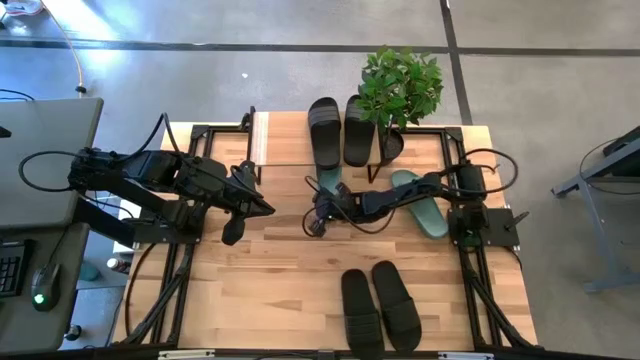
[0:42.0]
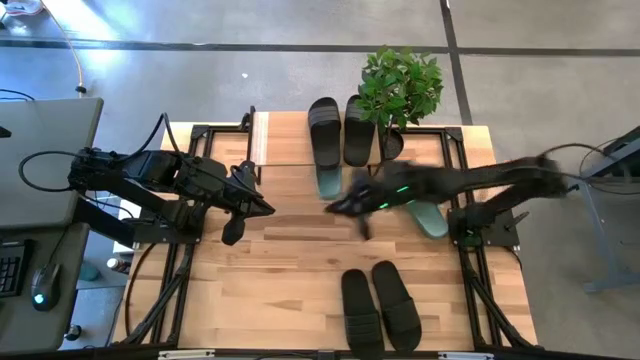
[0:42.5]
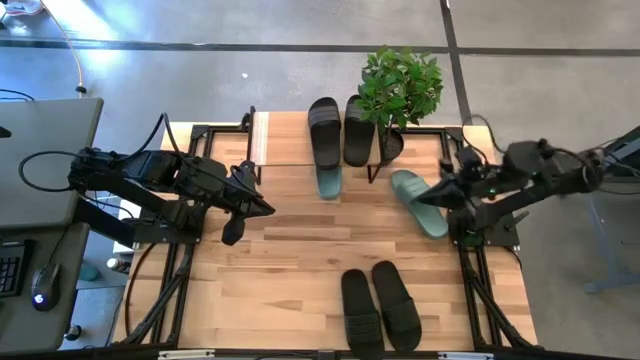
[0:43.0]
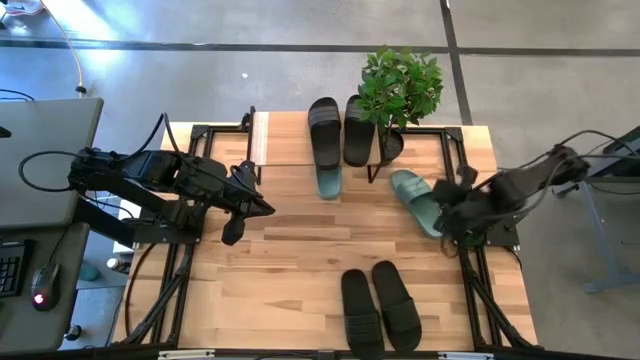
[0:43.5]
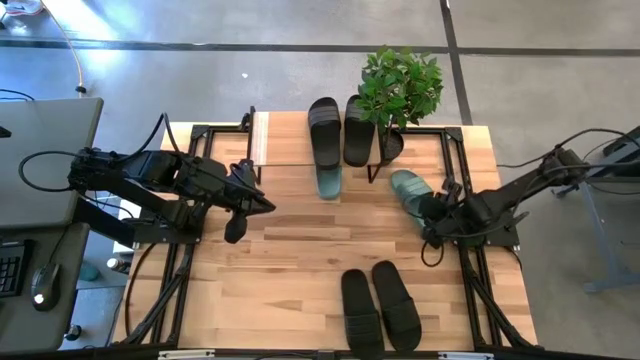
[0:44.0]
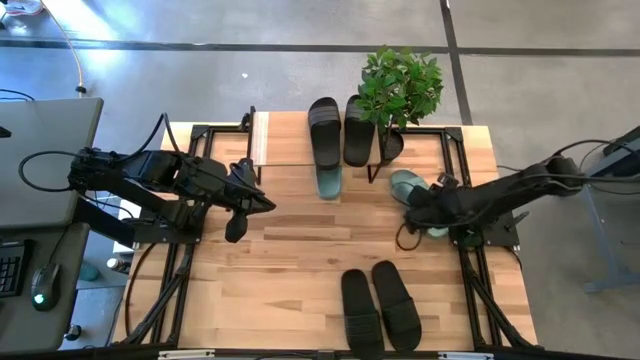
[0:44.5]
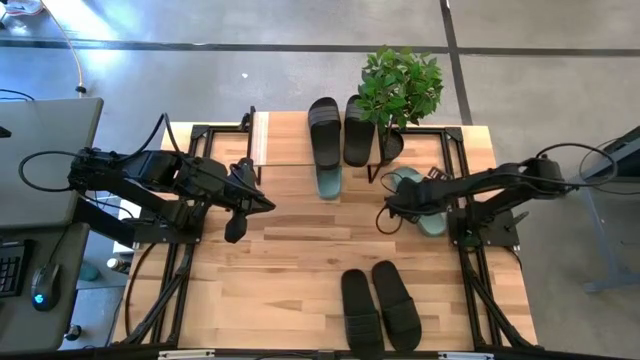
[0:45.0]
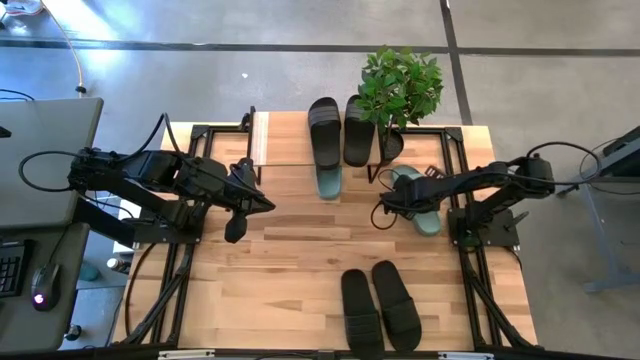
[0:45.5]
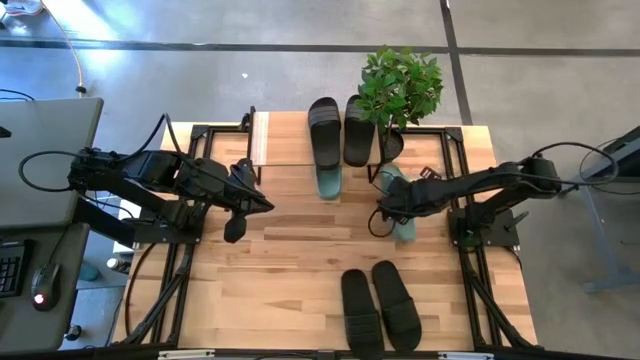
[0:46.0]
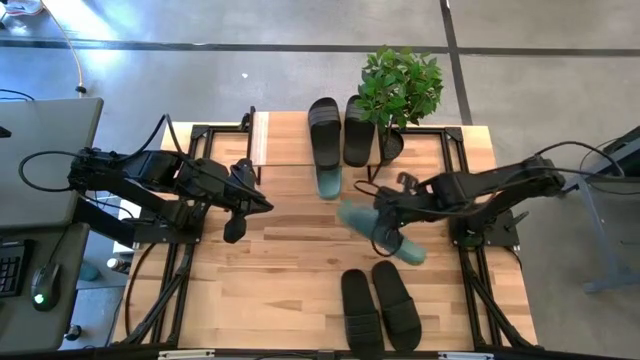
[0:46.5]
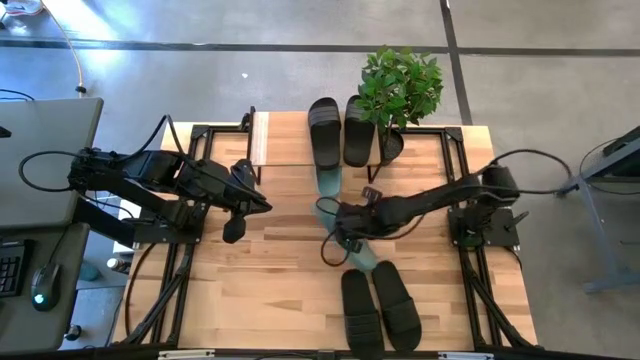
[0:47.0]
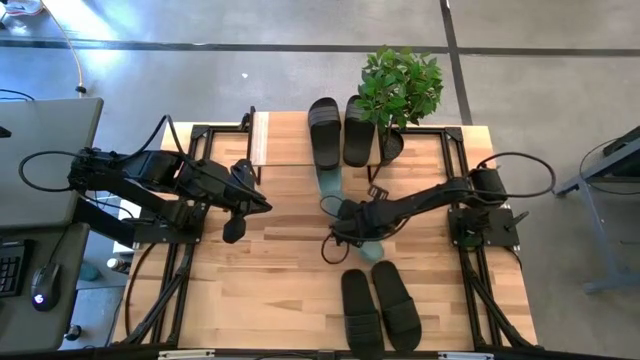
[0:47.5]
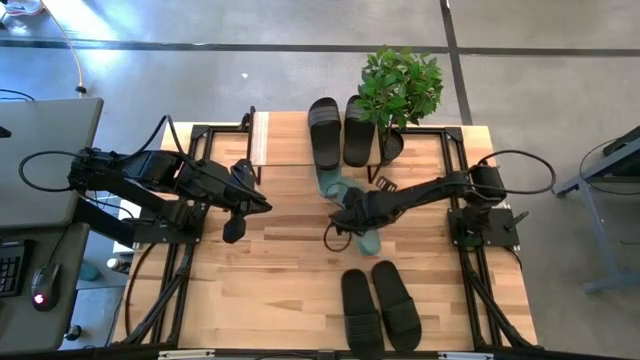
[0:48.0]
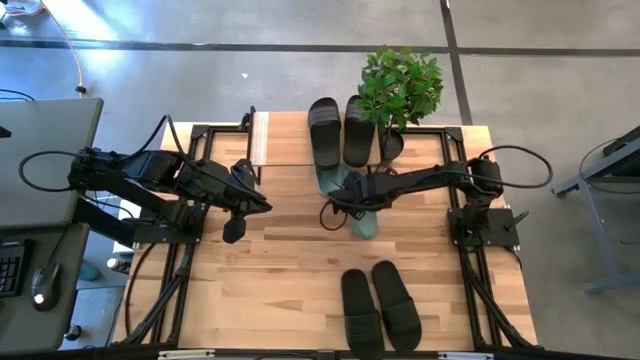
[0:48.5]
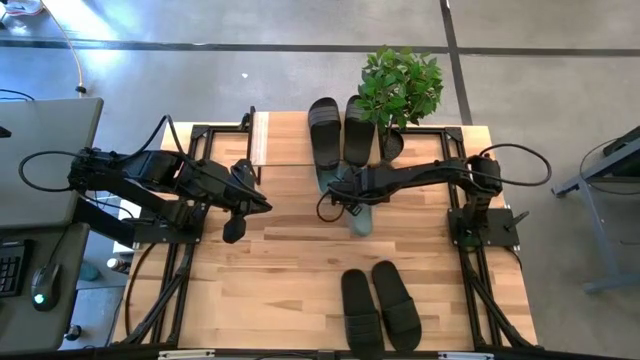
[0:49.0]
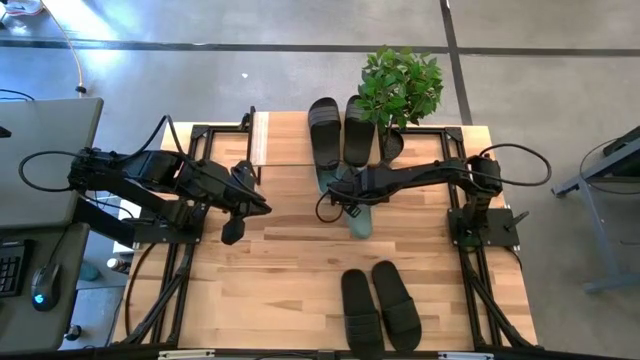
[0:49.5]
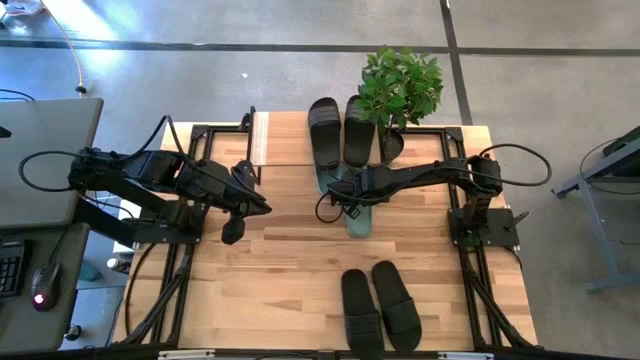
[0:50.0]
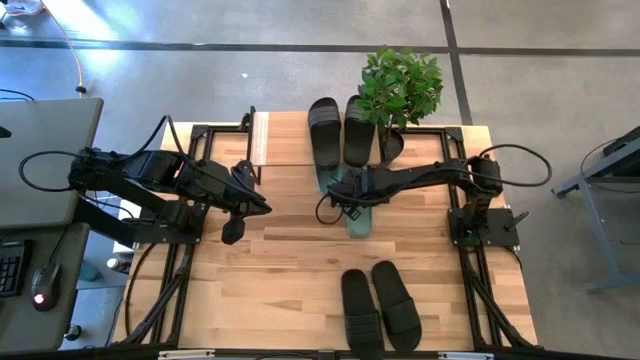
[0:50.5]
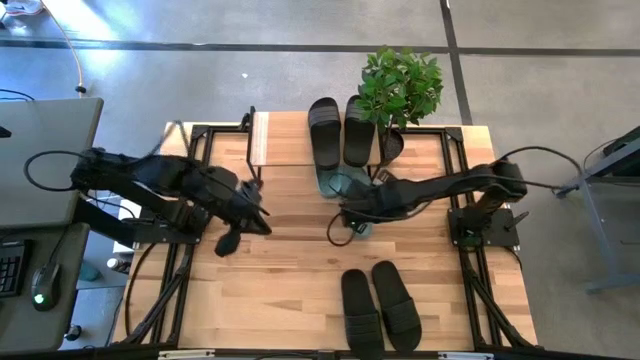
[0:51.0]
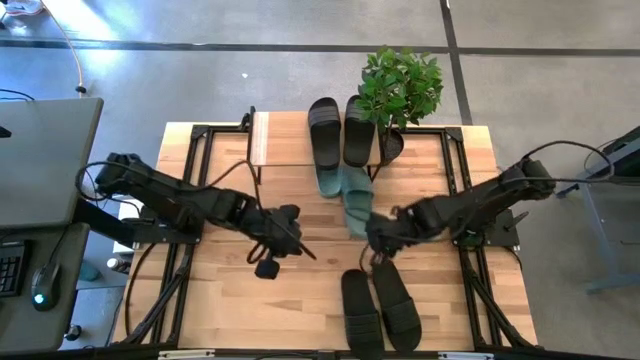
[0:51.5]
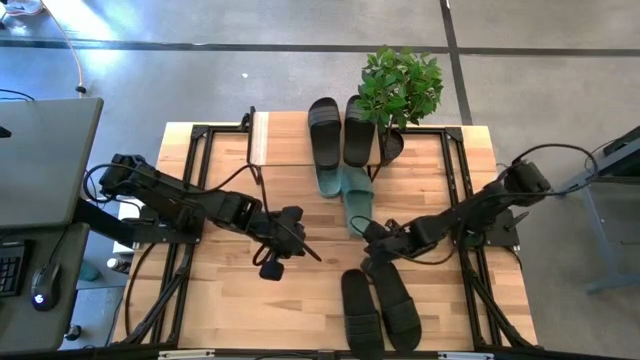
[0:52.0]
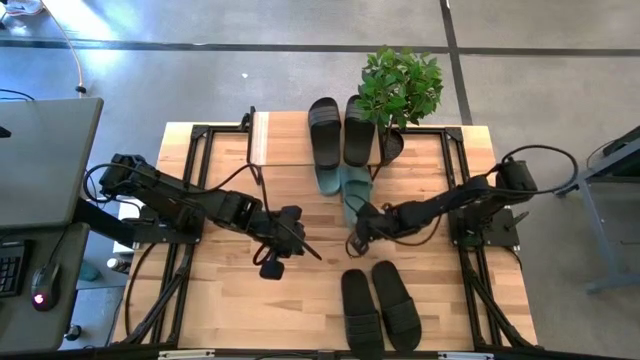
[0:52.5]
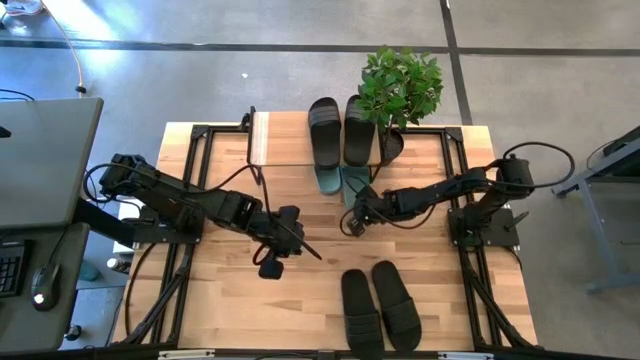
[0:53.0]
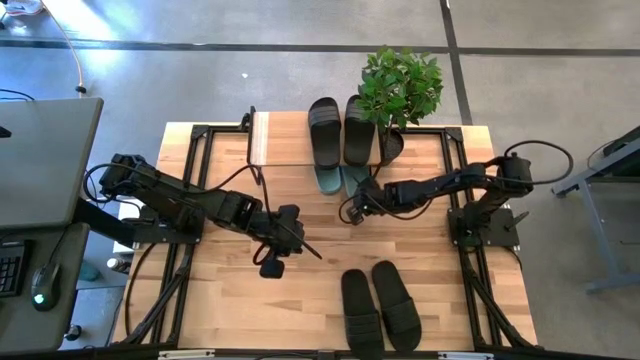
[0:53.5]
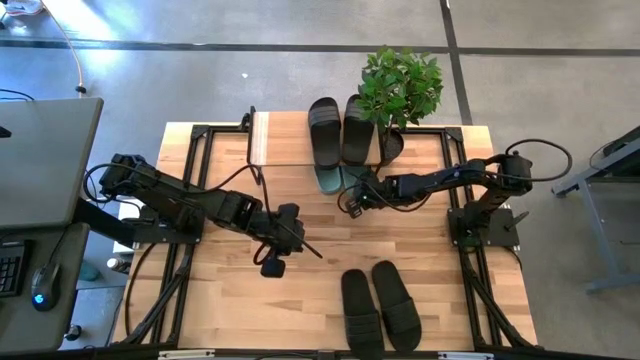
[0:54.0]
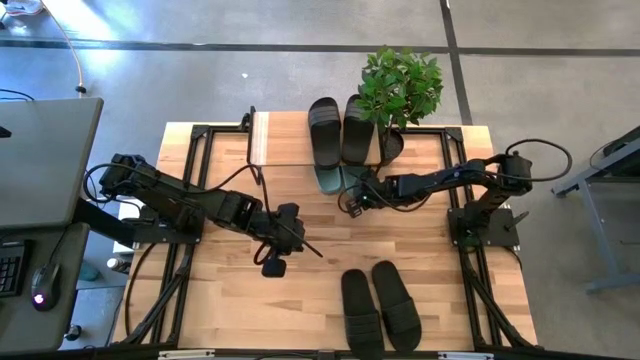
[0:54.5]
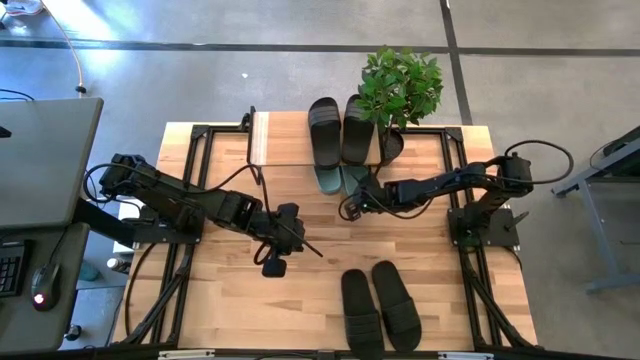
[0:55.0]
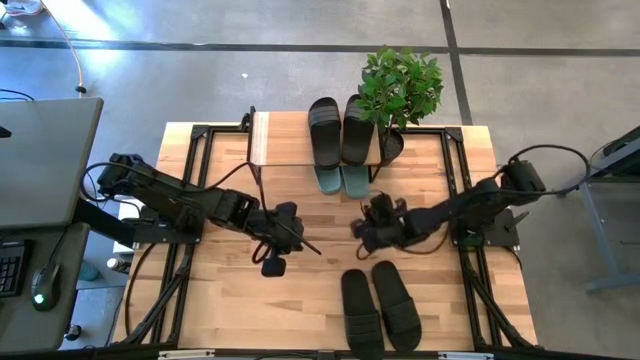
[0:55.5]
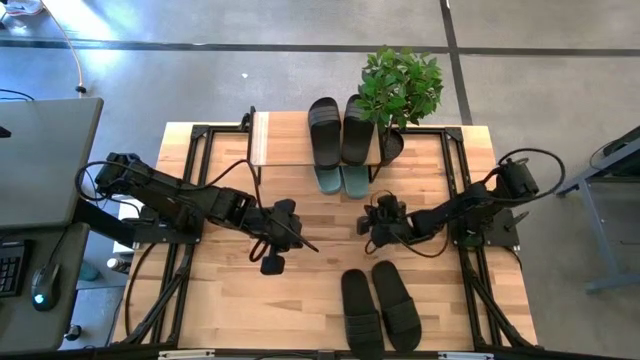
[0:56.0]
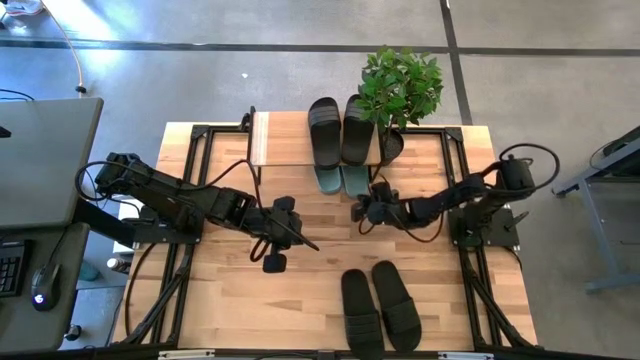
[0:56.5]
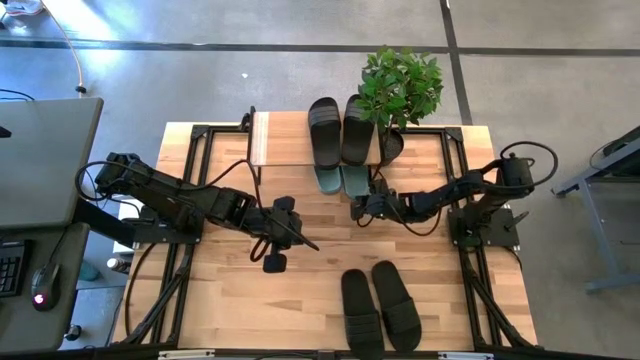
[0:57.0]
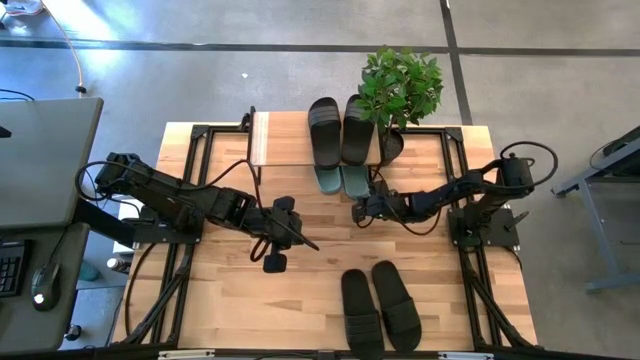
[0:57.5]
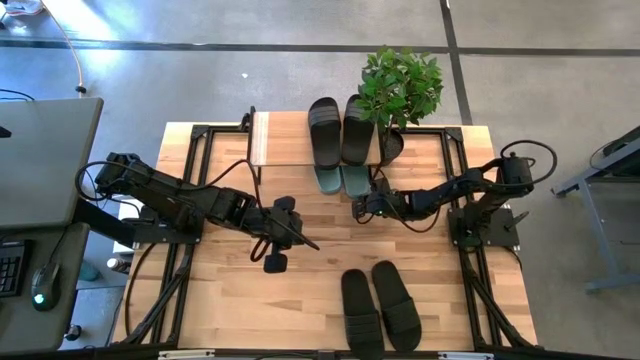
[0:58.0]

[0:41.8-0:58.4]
Task: Pick and place slides into the shelf
Put the green slipper under the shelf

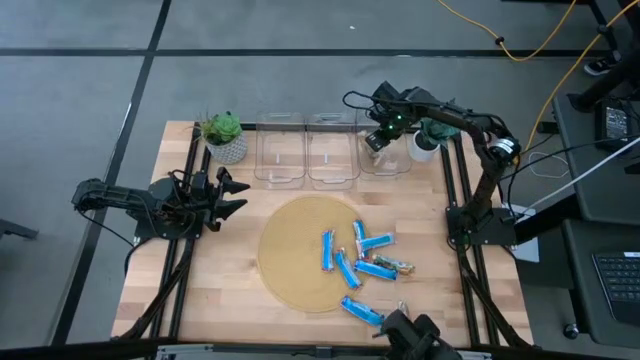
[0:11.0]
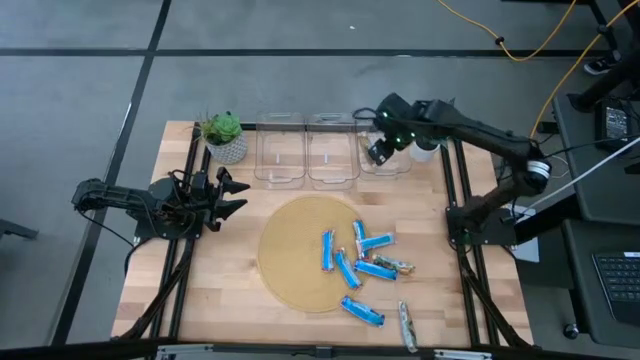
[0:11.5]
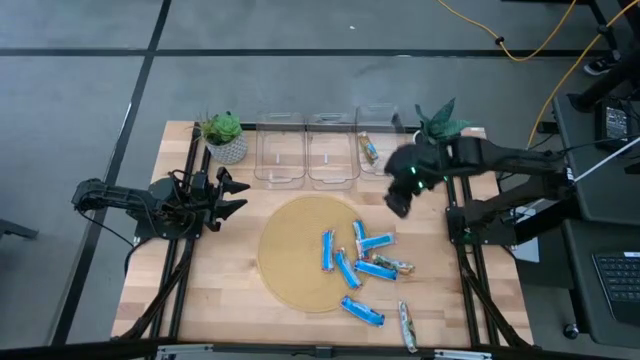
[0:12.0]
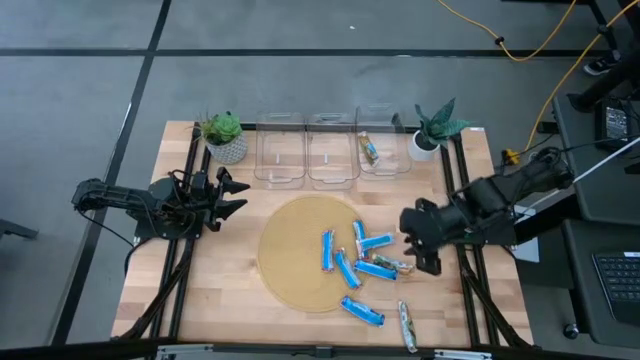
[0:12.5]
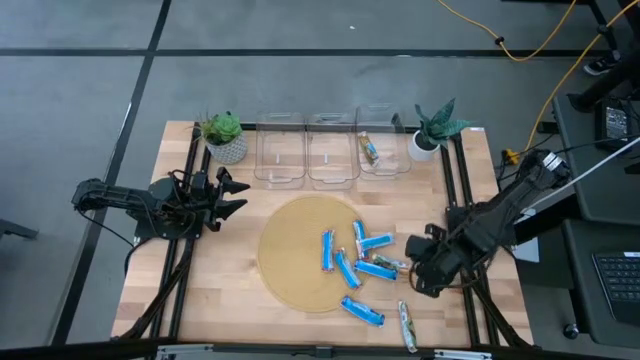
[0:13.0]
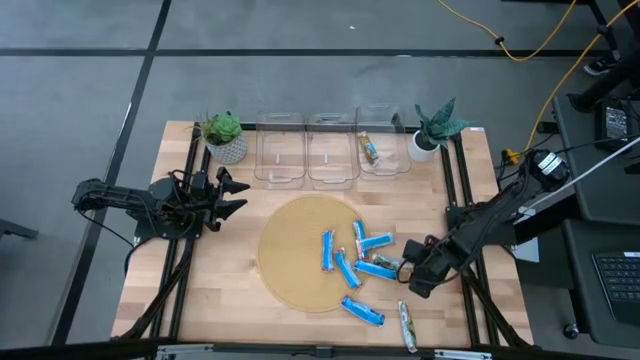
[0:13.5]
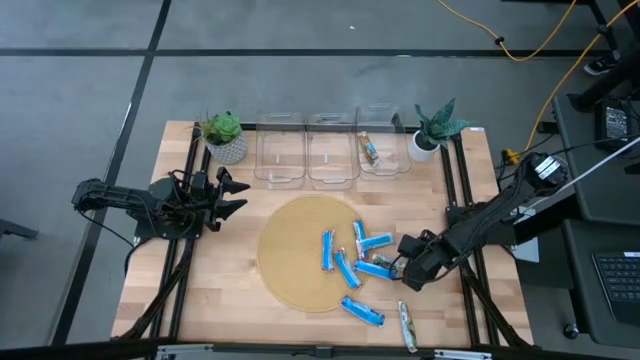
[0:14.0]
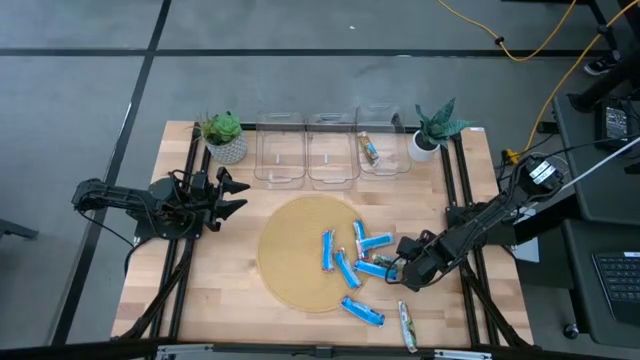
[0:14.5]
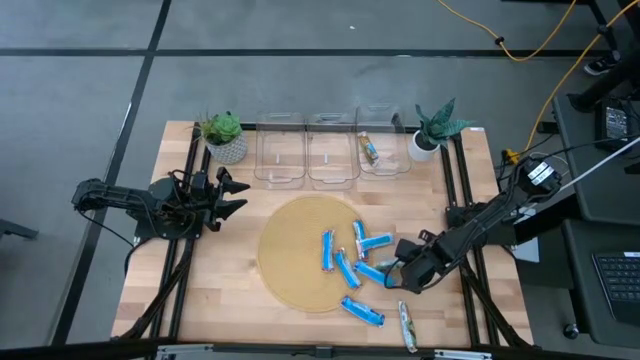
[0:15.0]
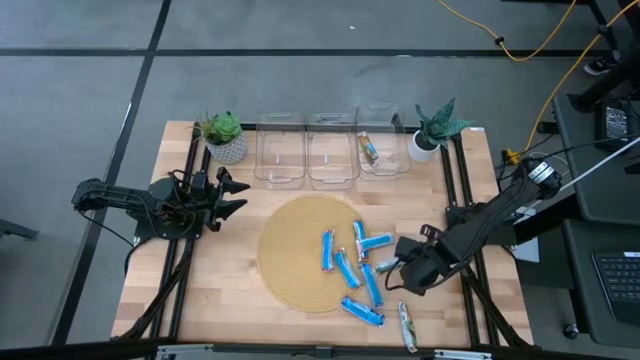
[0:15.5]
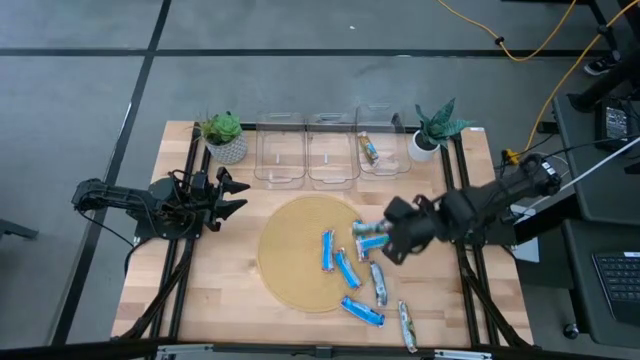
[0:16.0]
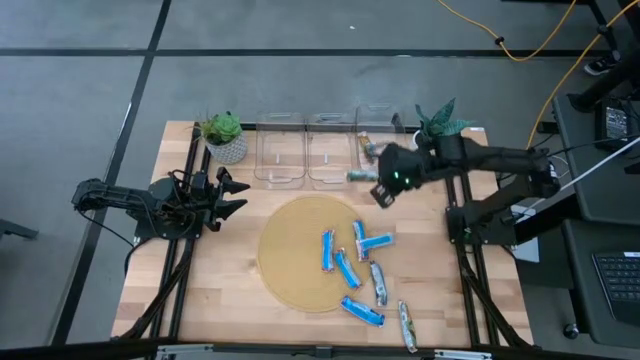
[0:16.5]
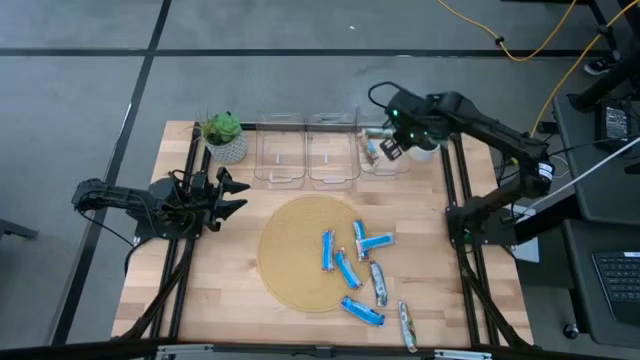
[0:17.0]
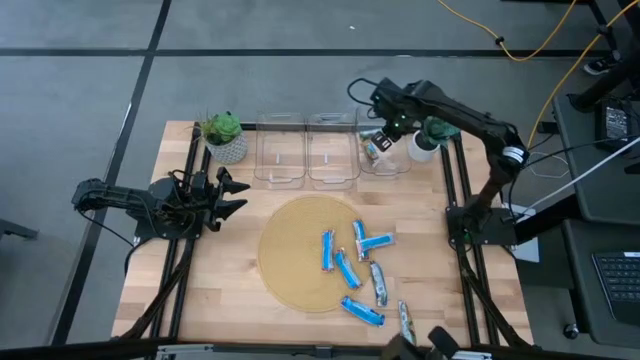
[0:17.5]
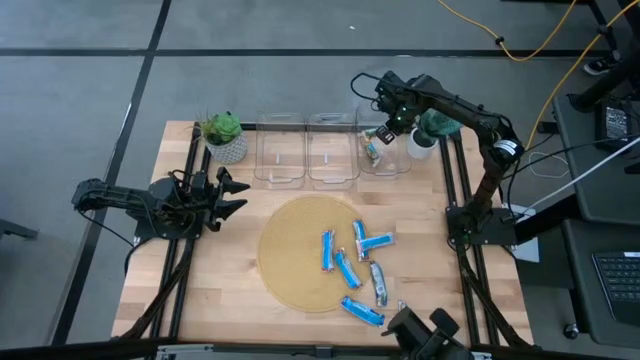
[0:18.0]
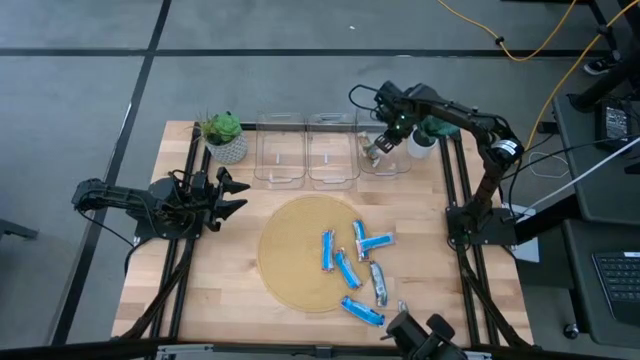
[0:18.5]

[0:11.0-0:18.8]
Task: Pick and place Granola Bars by type
Put the top yellow granola bar into the right transparent bin
